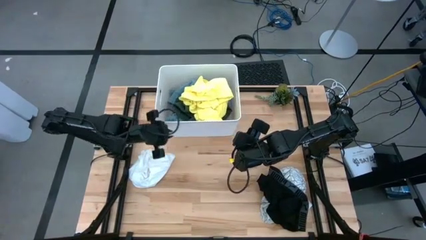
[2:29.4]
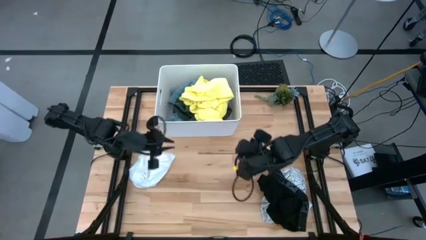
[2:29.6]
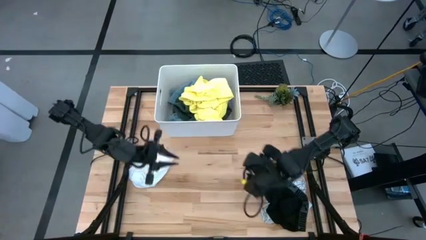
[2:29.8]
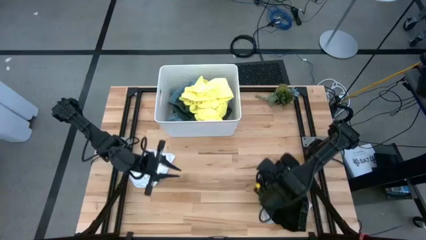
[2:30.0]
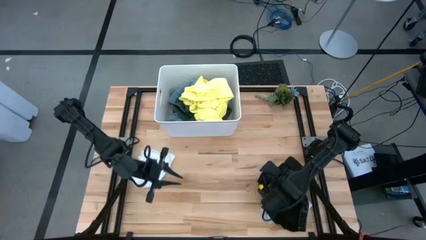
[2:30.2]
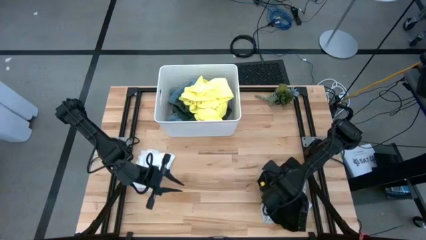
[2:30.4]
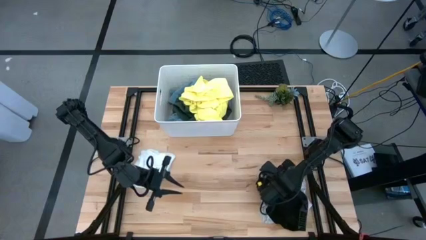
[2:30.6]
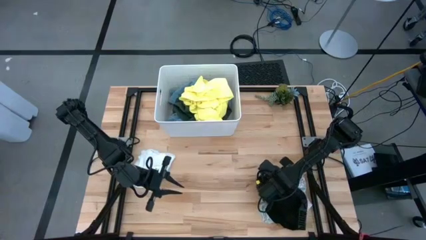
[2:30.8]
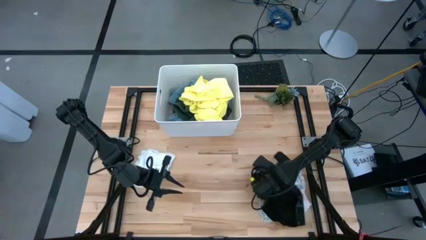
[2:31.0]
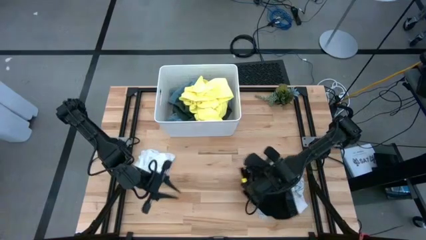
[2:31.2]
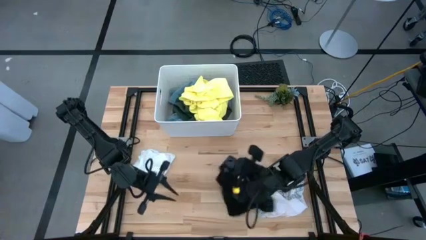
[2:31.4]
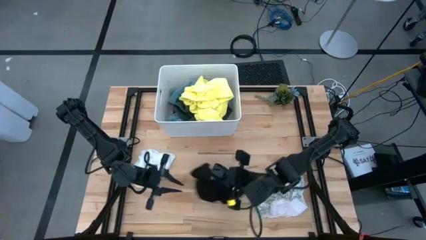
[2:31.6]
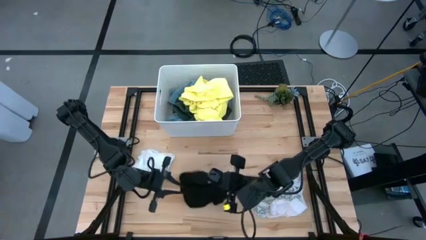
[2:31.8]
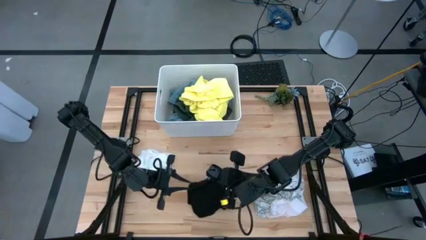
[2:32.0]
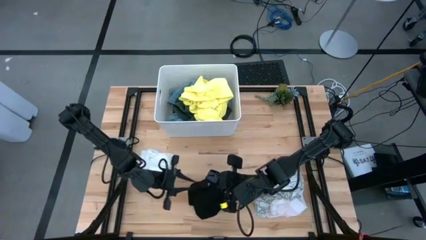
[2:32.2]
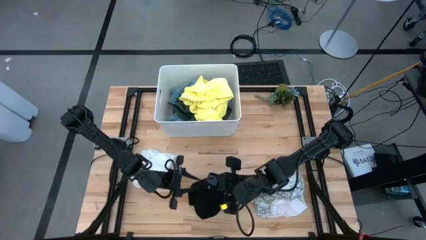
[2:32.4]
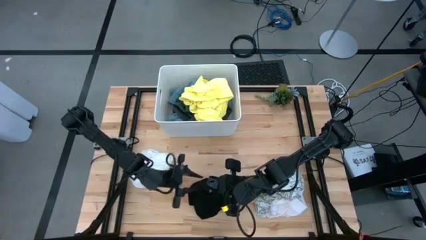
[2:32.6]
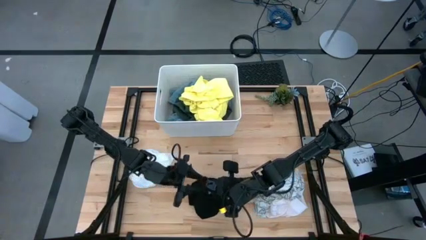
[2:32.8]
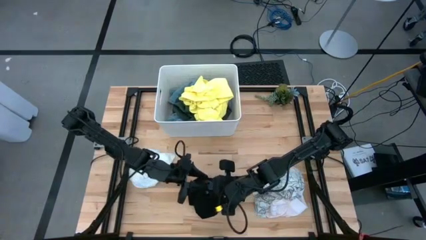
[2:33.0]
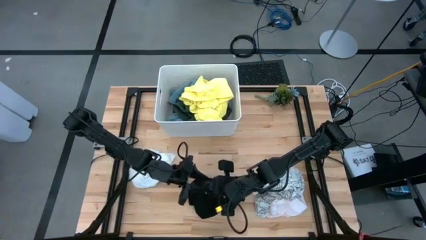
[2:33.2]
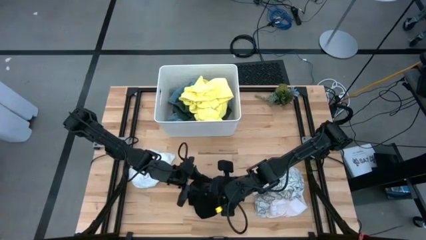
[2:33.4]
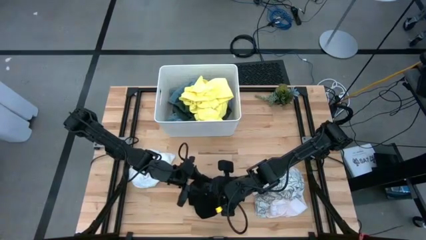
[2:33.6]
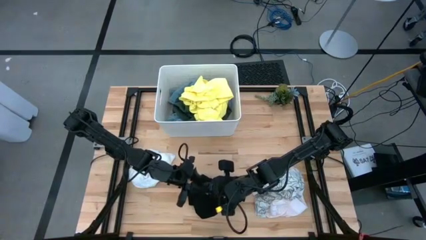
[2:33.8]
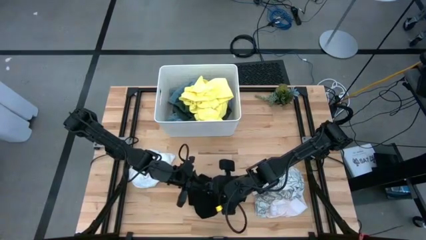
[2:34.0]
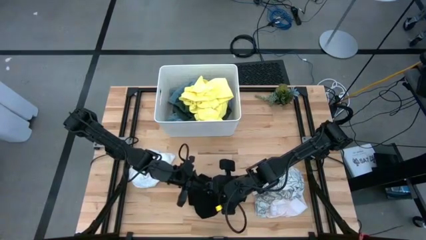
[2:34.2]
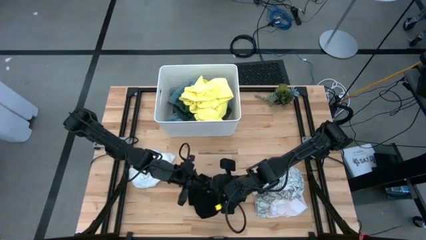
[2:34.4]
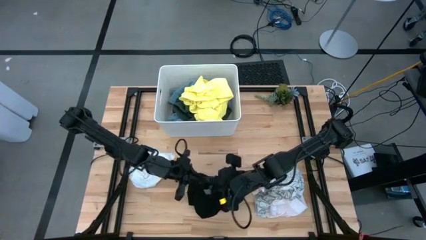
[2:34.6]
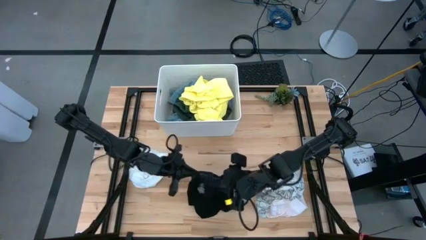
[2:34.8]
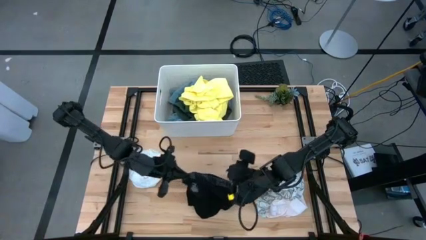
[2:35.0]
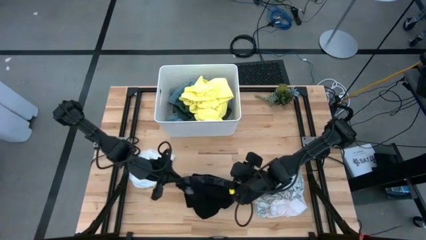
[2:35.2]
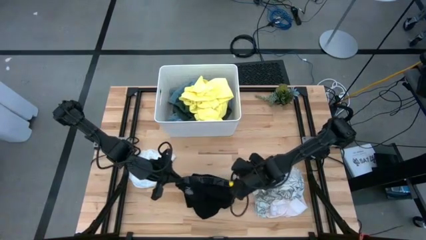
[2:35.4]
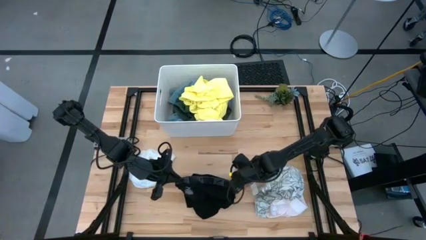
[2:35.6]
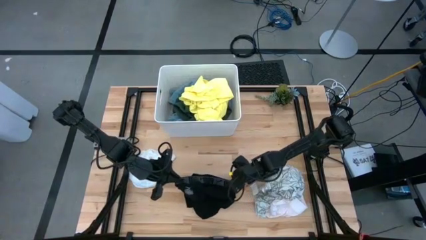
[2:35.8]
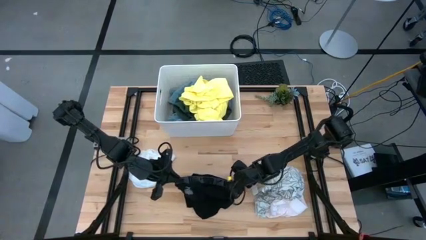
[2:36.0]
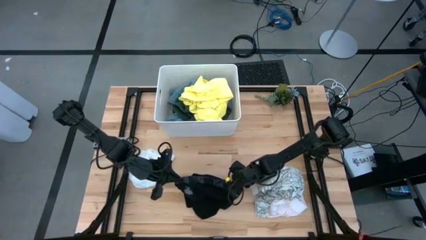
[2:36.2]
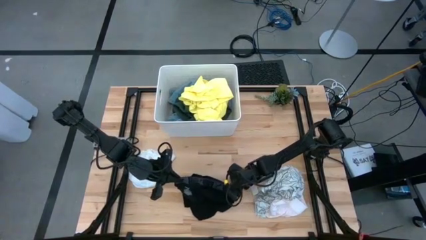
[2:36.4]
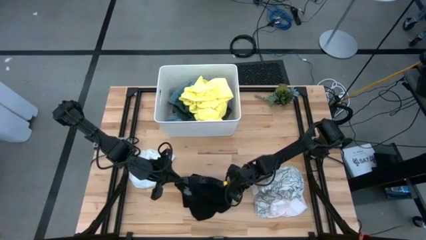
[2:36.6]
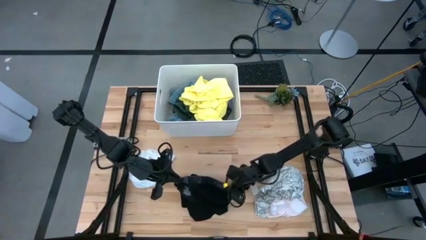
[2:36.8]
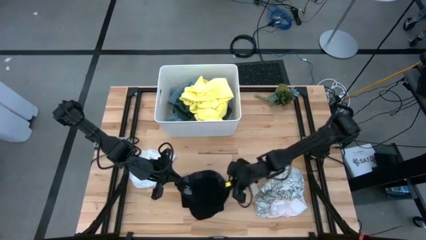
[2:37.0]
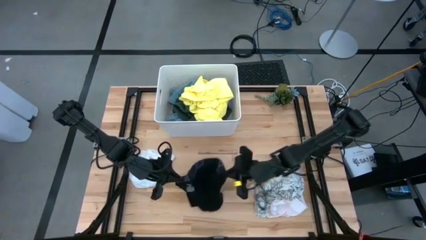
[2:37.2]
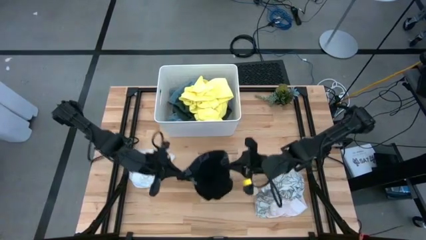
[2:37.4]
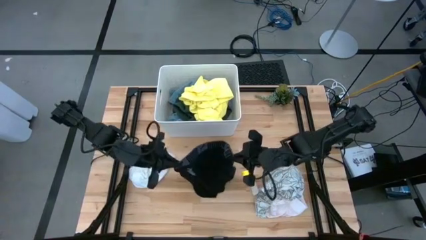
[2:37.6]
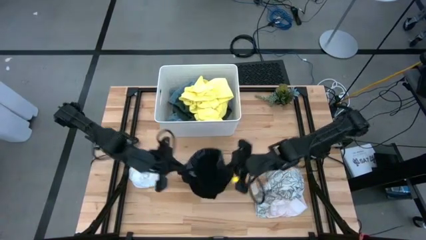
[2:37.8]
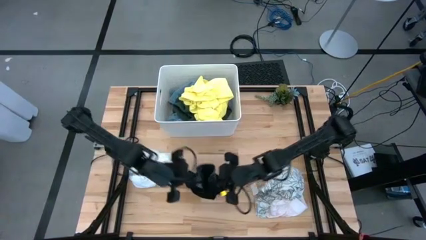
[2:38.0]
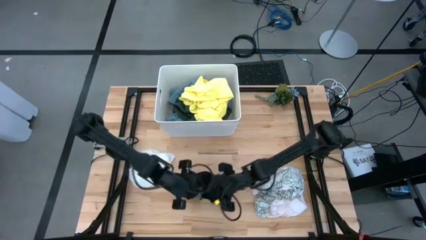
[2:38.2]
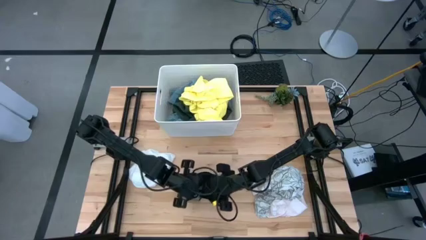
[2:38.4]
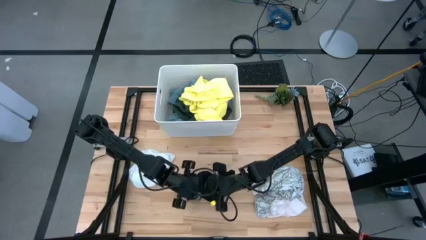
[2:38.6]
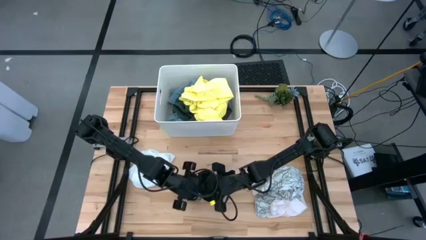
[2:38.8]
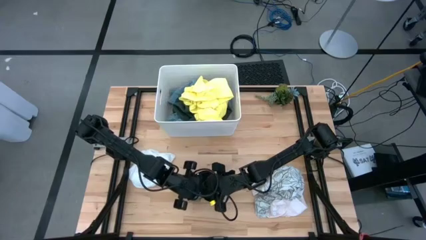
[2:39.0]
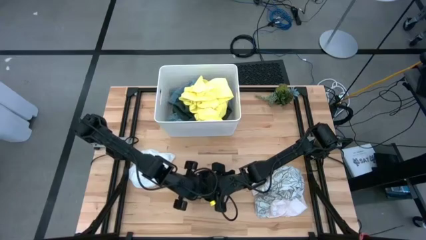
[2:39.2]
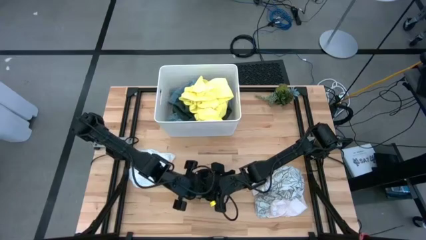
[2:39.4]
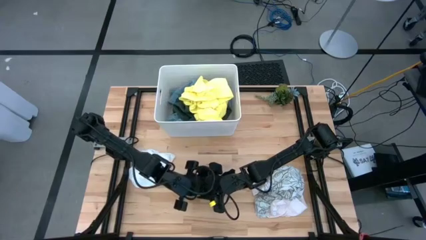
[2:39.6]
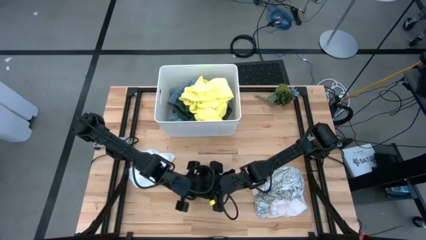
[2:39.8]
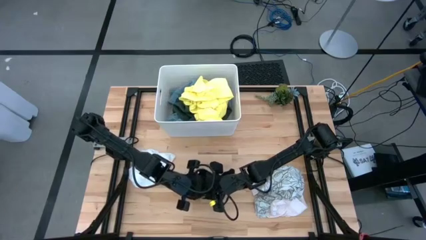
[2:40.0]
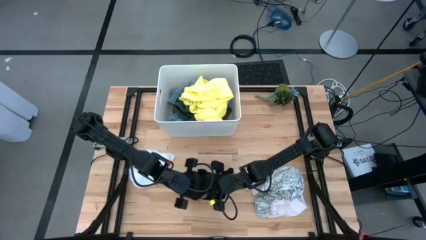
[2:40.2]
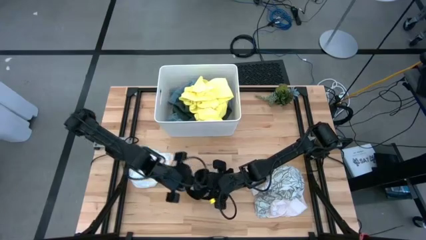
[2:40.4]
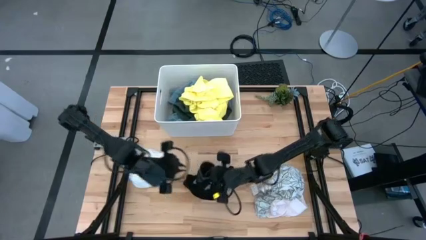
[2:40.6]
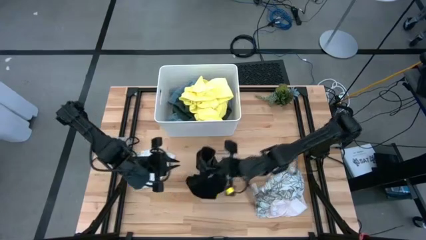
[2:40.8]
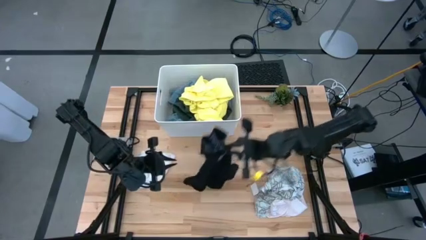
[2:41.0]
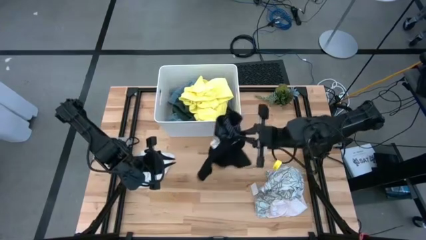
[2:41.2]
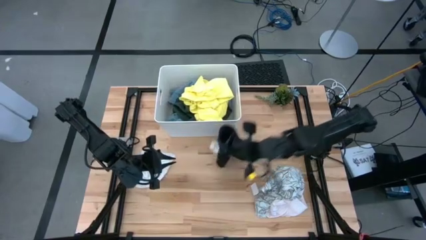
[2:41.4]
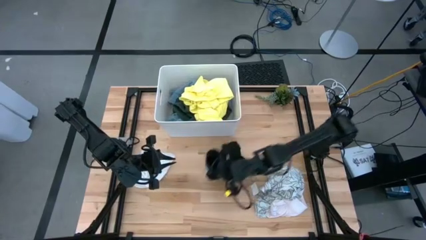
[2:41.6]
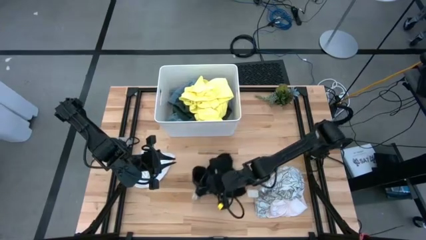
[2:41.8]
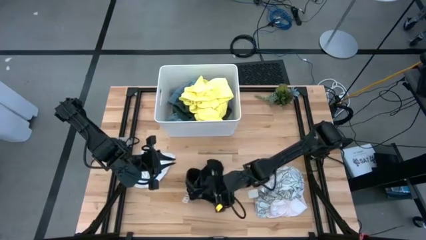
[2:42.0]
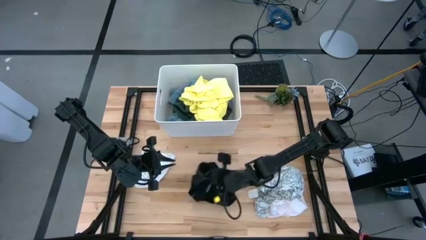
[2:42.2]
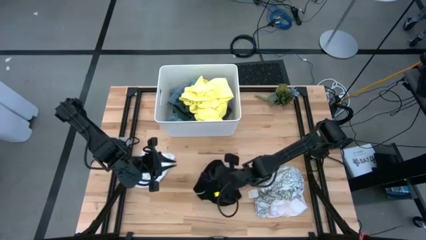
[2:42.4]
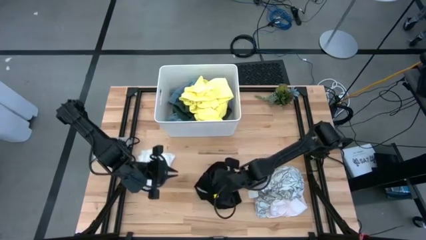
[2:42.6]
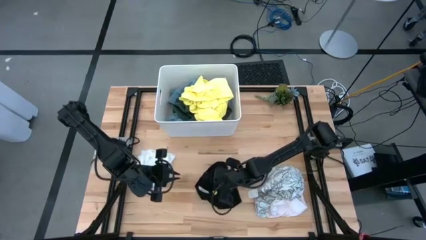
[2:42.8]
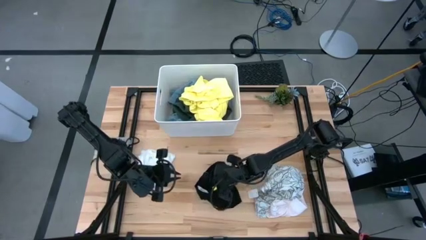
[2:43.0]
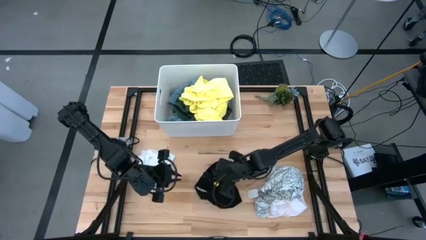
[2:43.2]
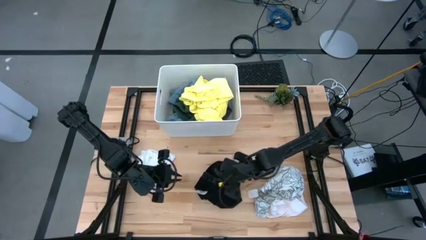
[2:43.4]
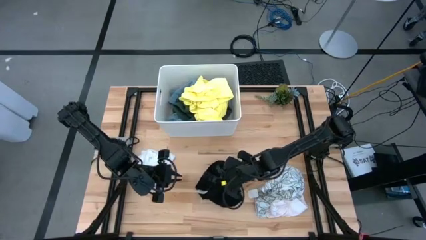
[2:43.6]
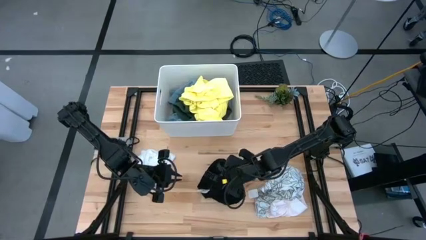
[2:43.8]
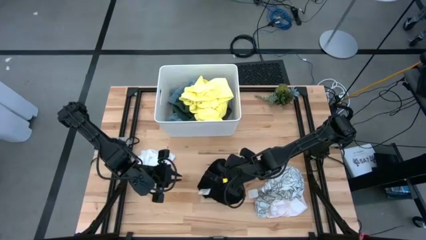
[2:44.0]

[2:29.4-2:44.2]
Task: Fold laundry
Fold the black underwear

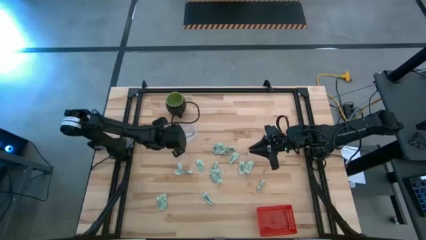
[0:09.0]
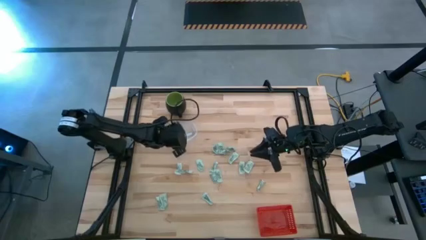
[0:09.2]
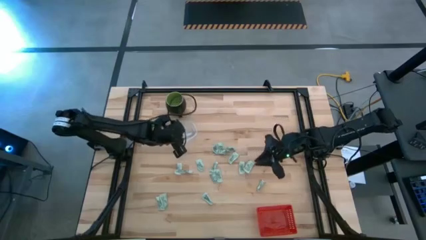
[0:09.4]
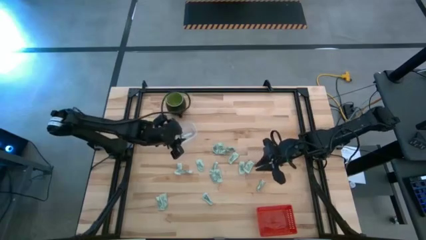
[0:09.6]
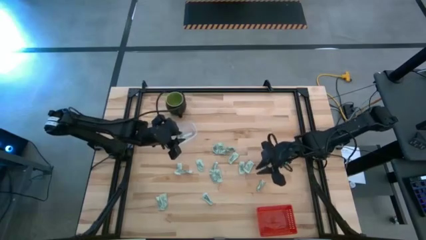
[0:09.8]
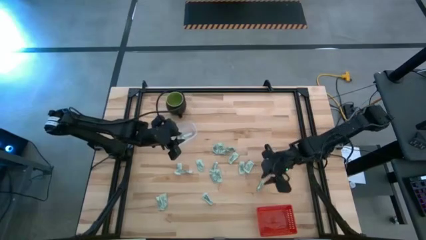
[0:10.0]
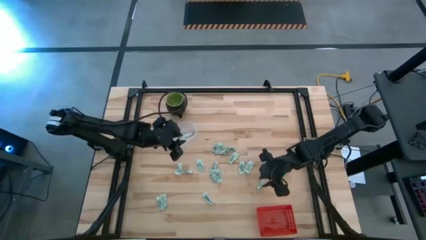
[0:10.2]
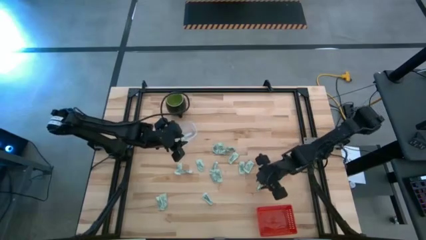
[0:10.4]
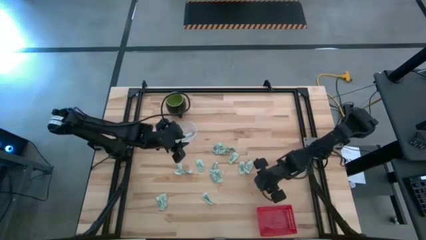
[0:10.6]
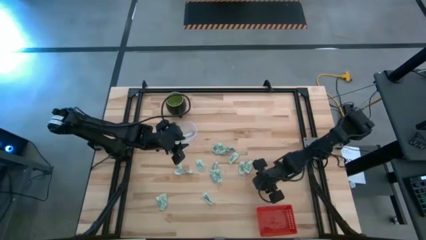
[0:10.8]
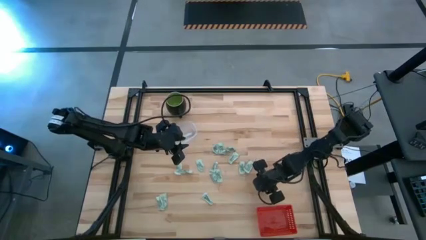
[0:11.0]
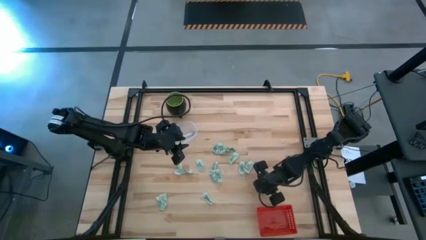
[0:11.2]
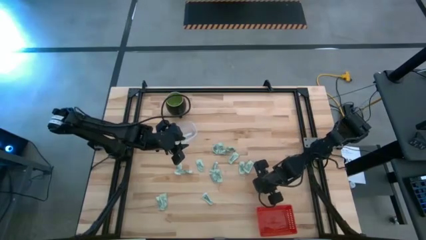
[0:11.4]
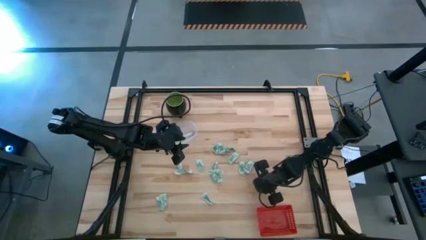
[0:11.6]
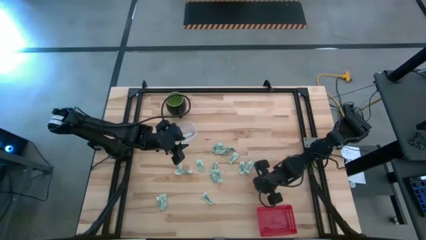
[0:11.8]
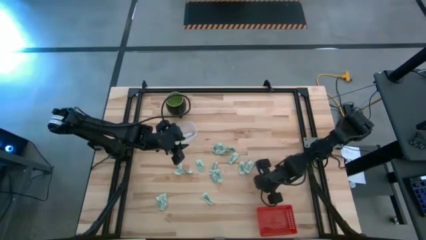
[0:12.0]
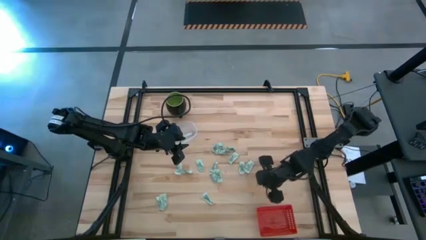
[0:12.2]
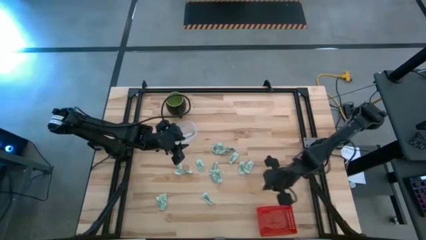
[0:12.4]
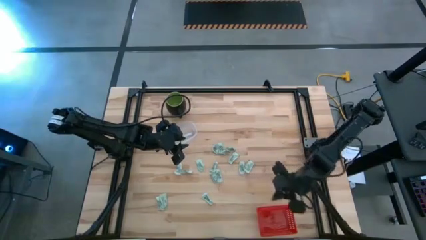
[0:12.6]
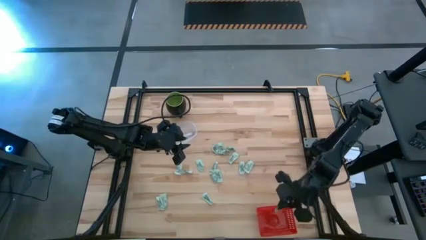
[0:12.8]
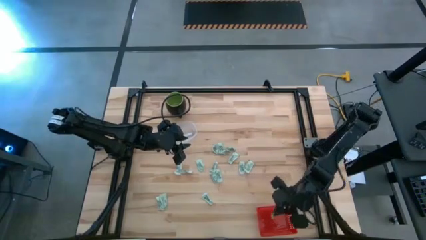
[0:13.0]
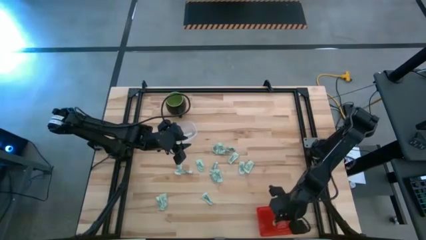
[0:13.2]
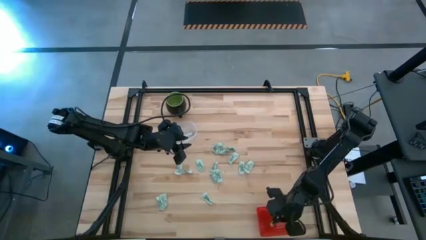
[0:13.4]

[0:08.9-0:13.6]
Task: Pick and place items into bin
Put the green stevia packet into the red basket
